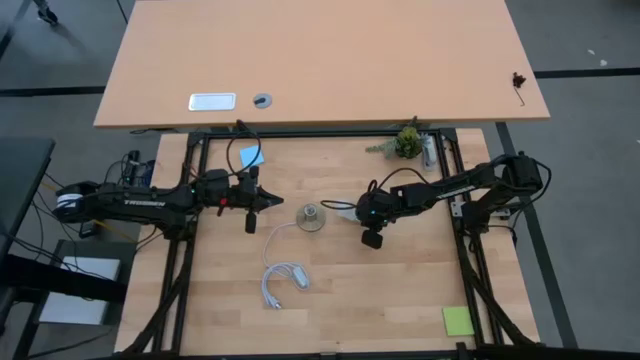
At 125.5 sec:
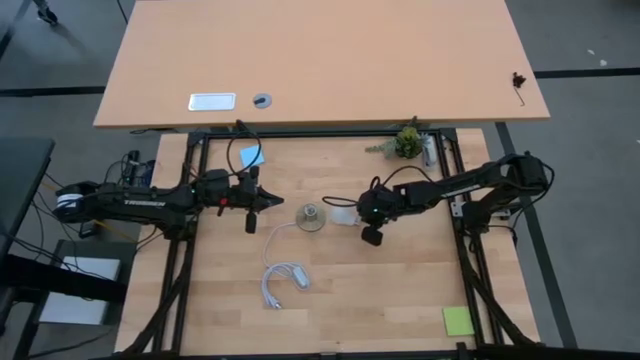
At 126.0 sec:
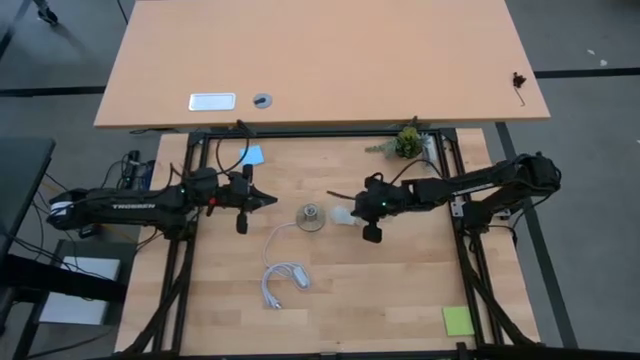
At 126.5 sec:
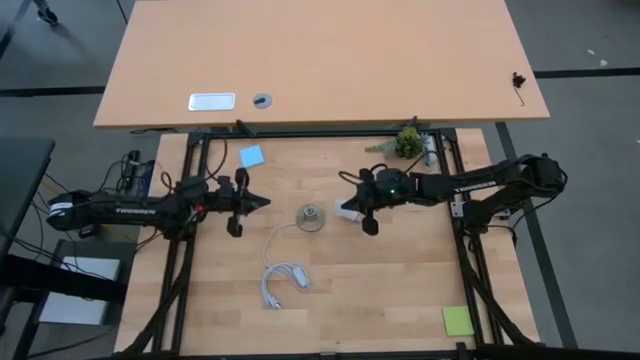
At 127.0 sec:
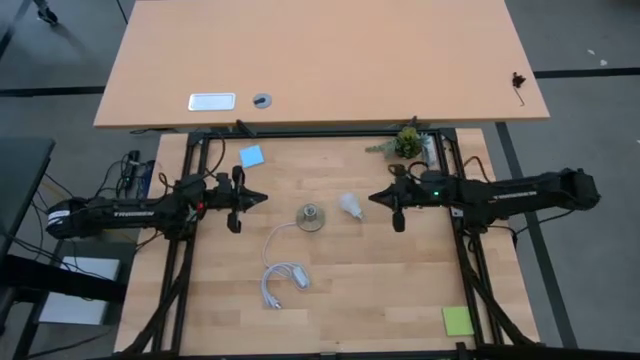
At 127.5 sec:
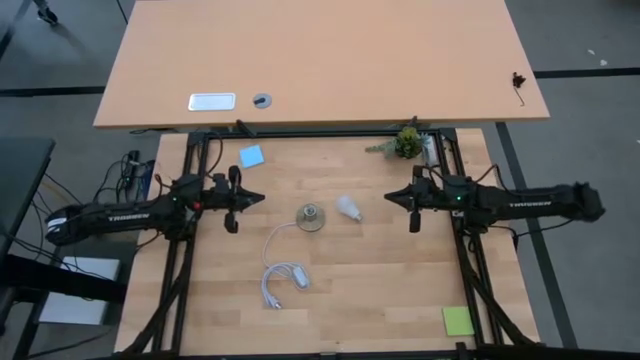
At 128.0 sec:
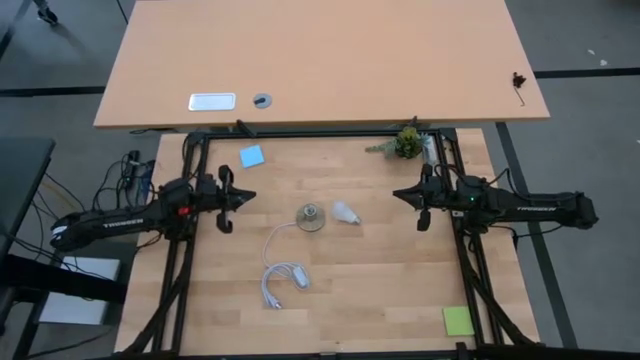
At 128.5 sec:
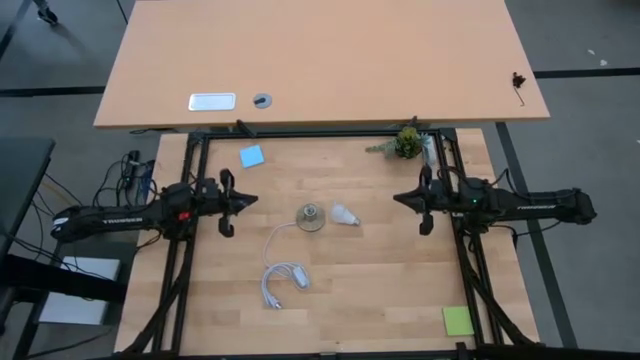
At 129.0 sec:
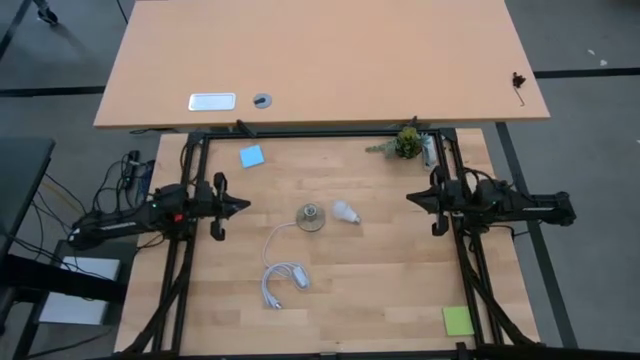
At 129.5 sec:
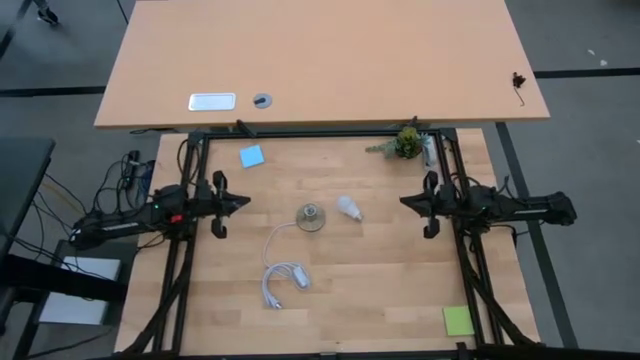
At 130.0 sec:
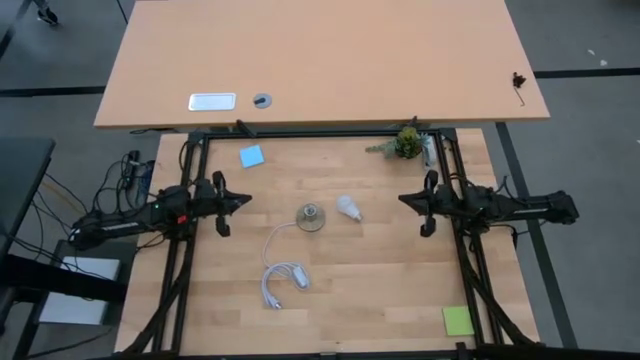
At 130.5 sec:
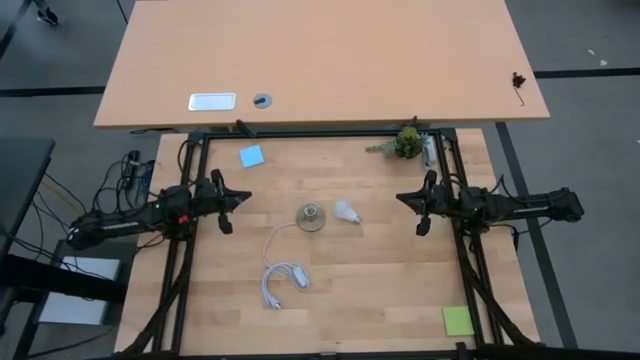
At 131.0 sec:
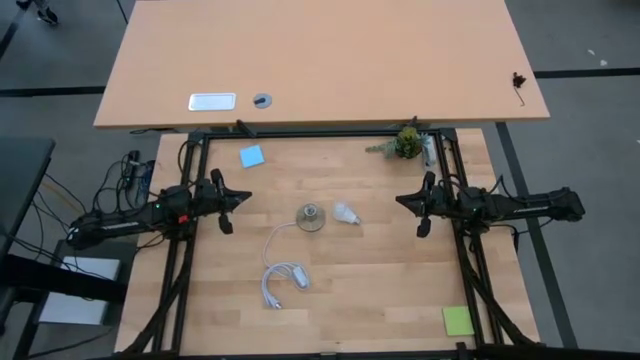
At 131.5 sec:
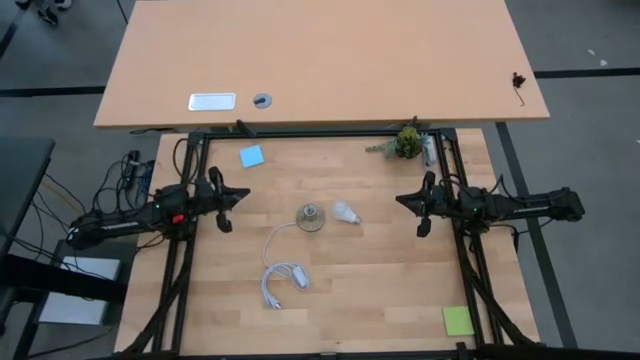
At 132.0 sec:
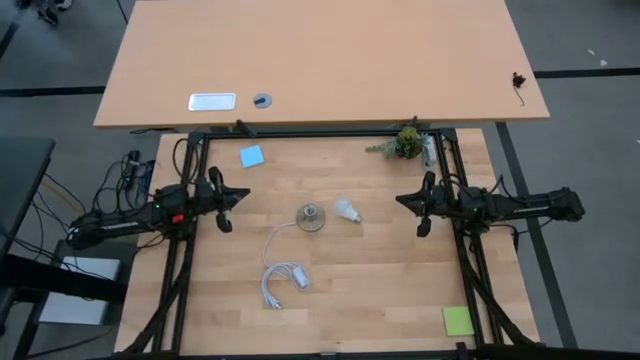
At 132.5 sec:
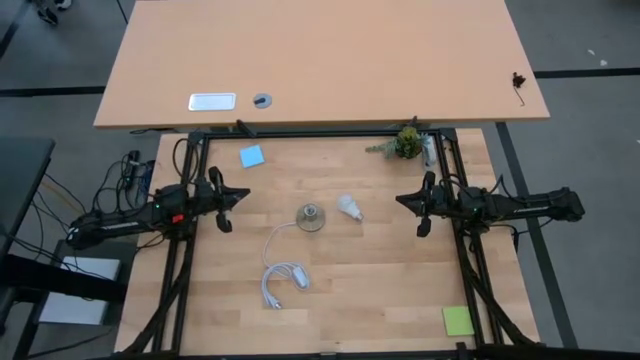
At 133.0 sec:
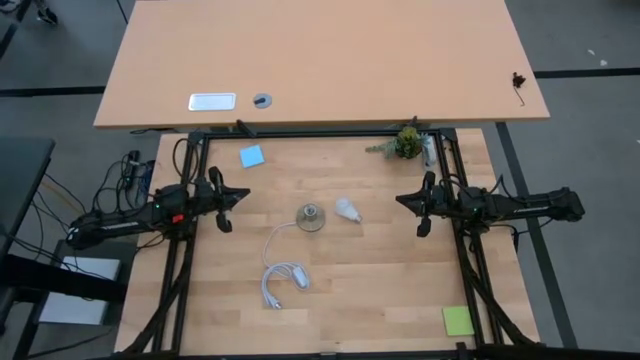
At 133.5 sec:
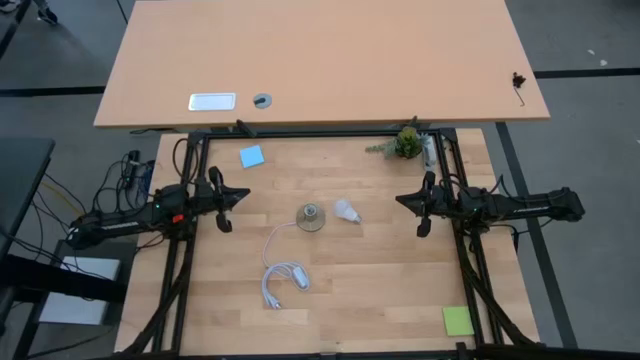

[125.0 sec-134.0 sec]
Task: Screw lightbulb
Return to Home Position

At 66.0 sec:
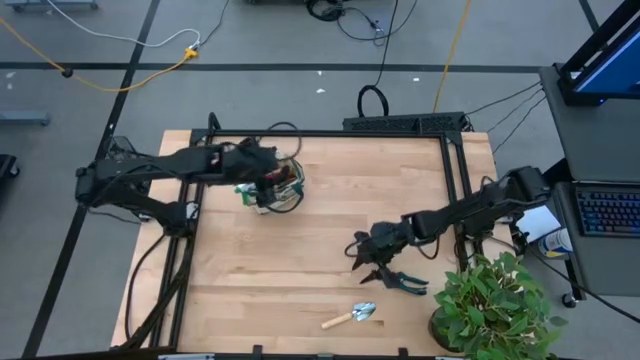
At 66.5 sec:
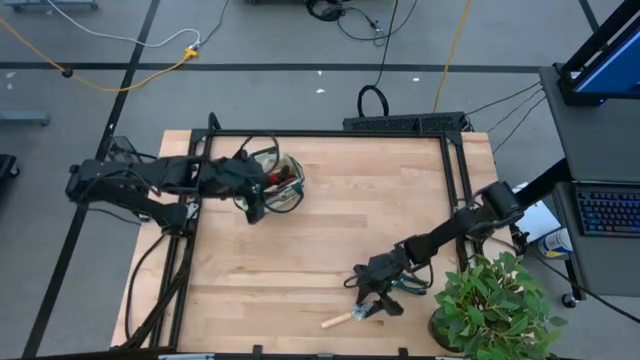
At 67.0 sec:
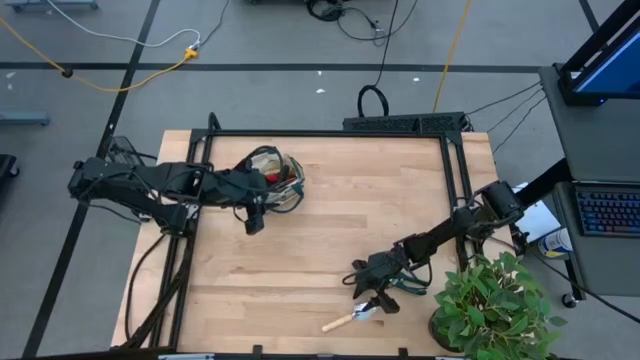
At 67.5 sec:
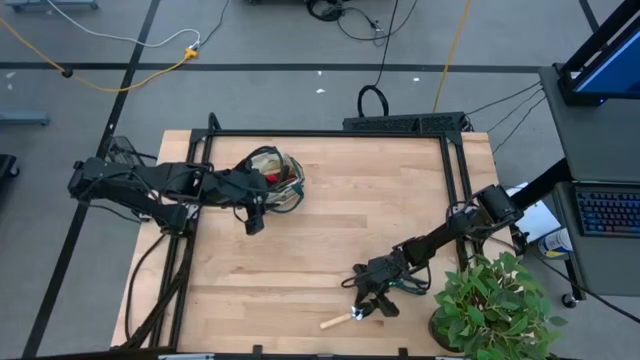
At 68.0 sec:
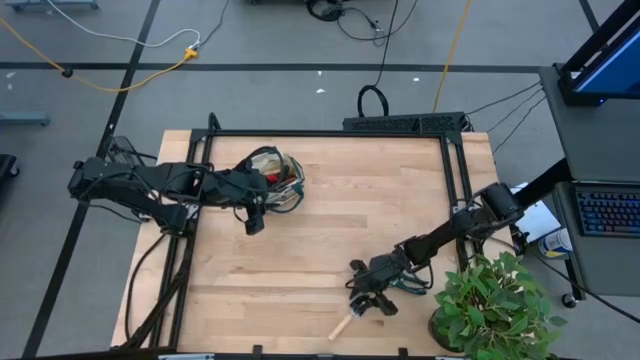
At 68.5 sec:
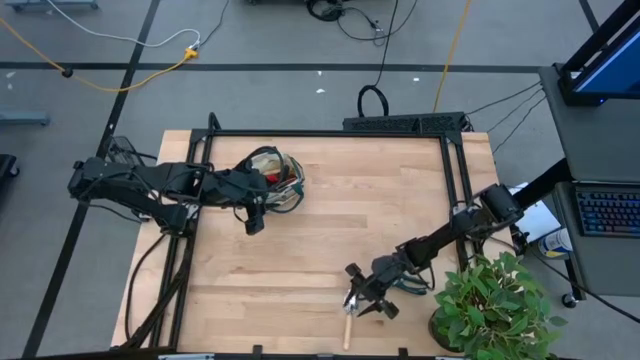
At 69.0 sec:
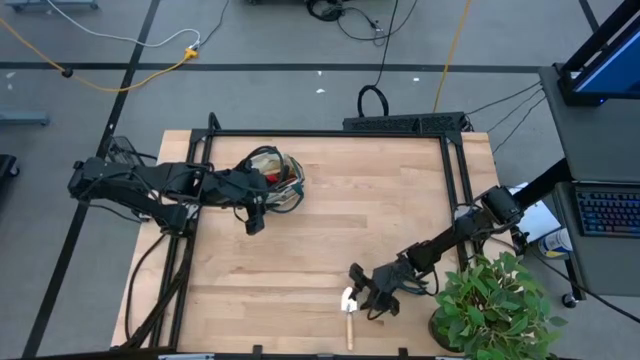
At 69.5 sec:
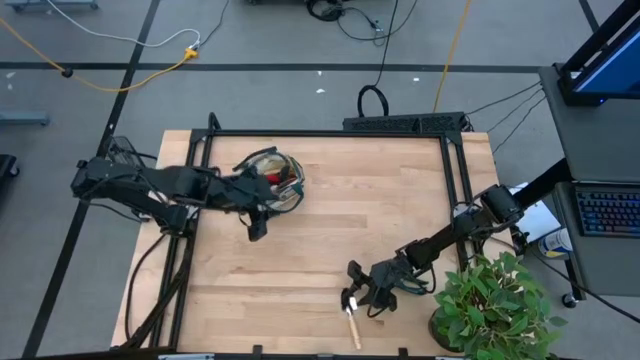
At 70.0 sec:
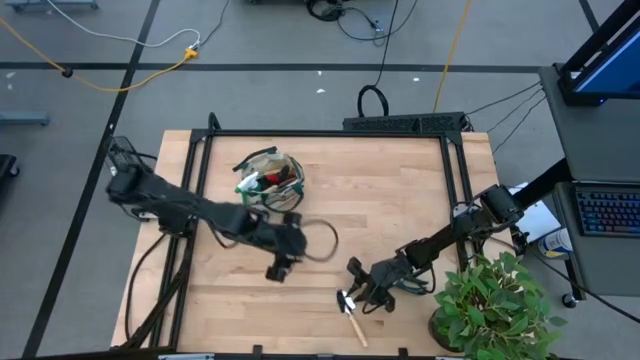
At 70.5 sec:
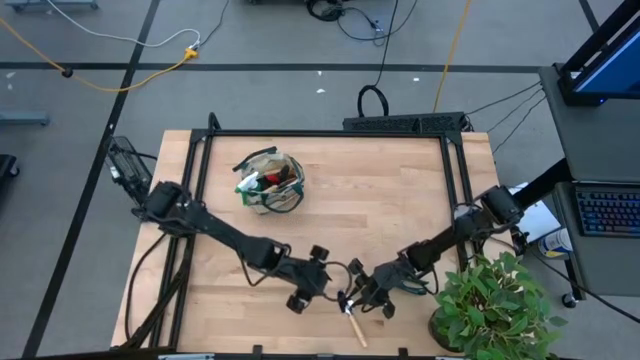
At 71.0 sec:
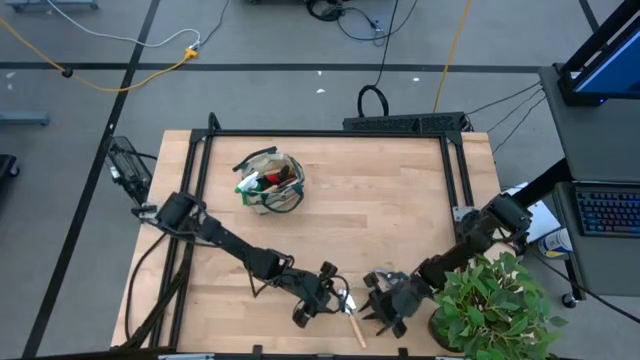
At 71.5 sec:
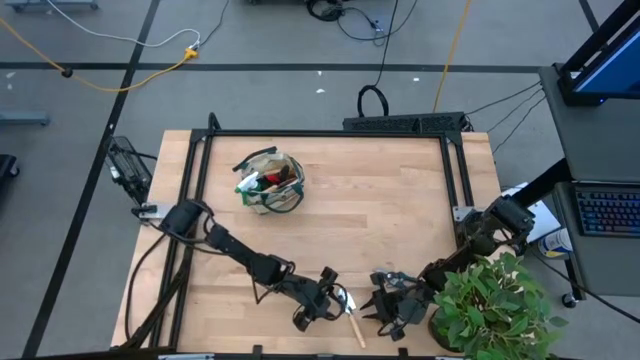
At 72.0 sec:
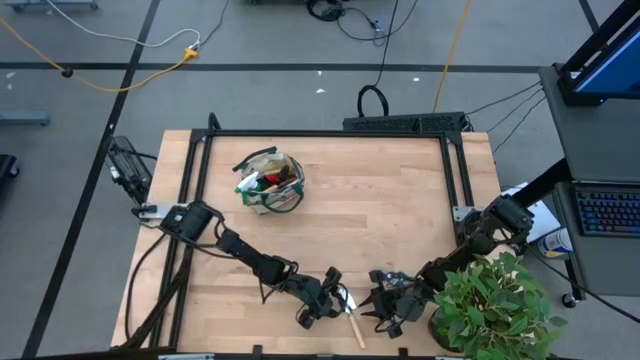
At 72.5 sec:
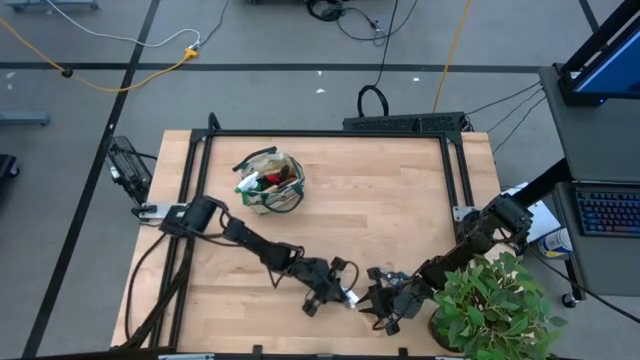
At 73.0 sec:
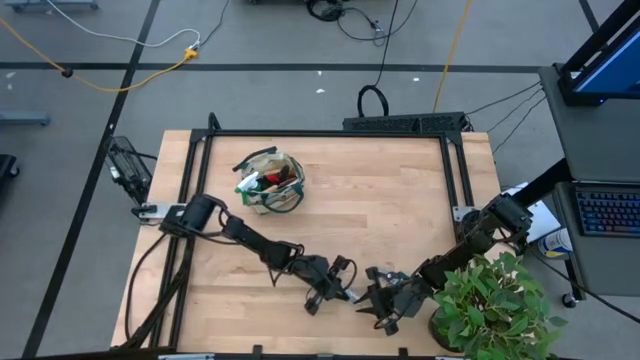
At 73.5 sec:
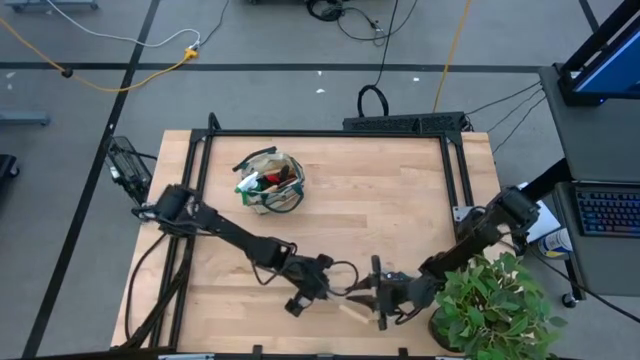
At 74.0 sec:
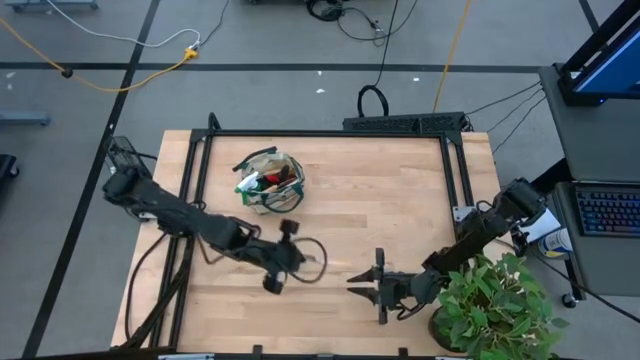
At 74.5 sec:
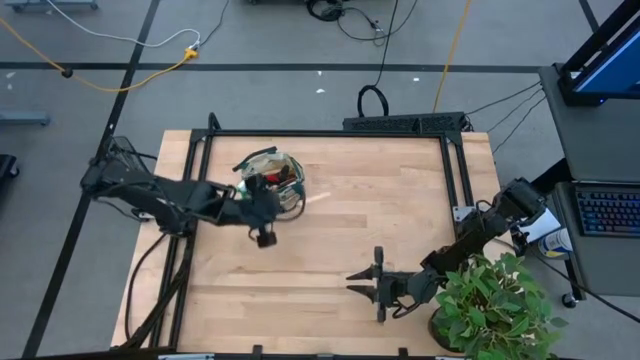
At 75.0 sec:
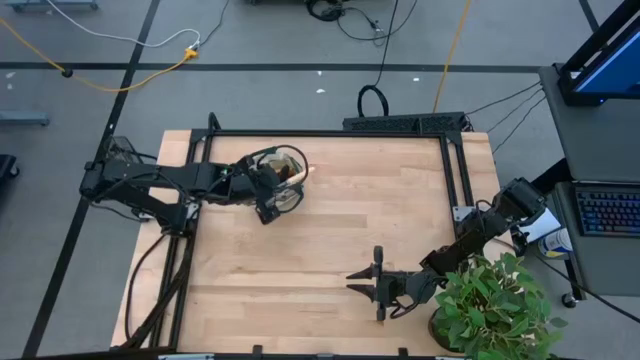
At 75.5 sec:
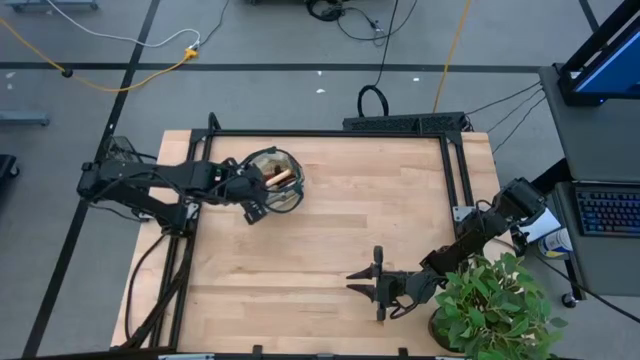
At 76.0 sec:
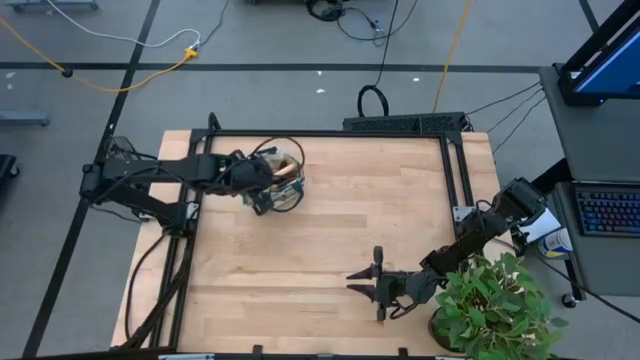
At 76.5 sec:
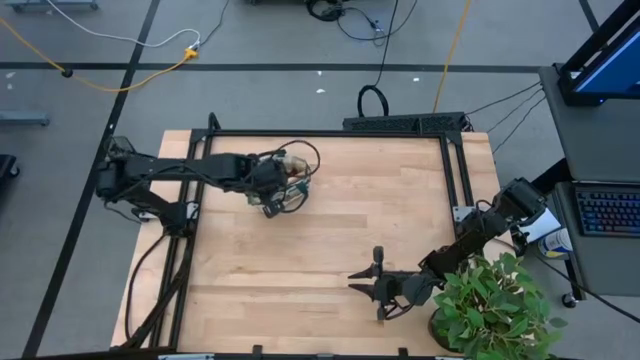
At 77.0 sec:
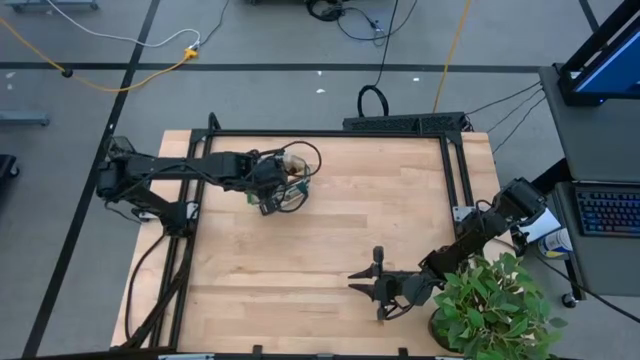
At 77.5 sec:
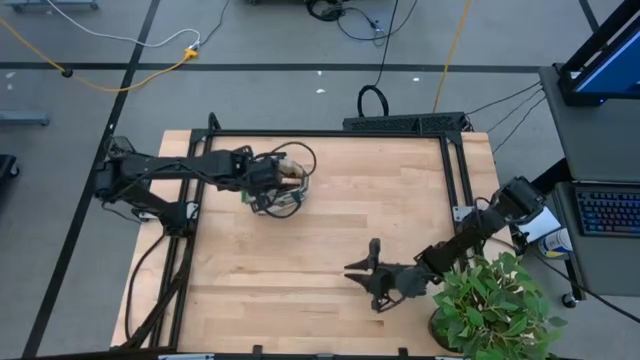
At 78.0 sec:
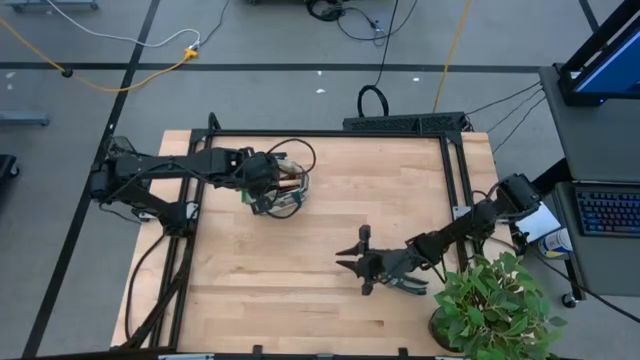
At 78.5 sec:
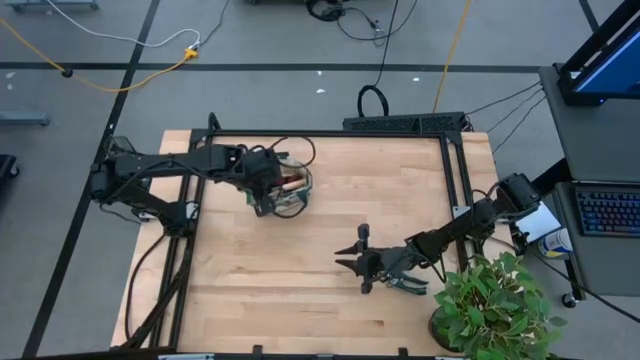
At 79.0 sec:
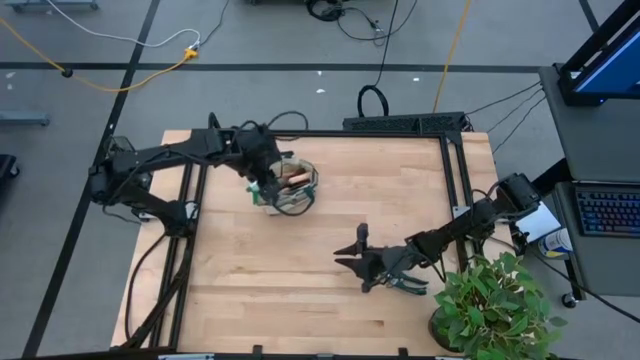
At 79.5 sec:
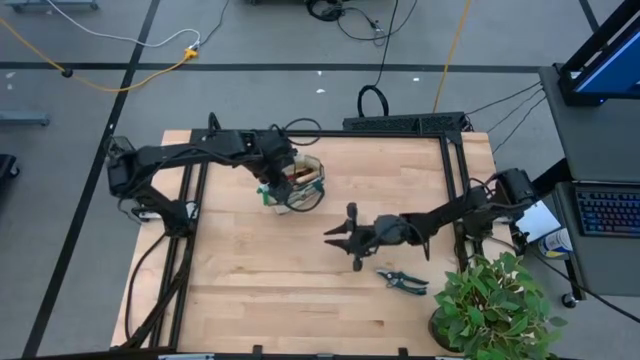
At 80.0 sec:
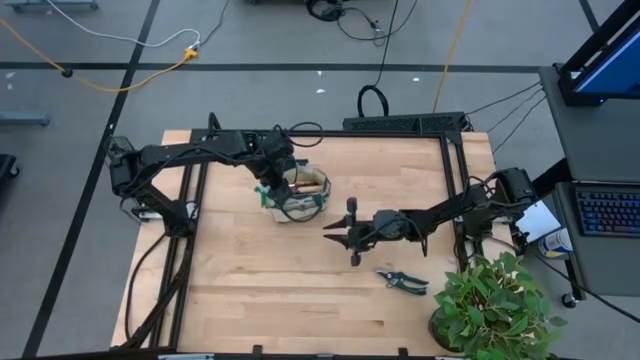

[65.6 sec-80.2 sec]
Task: Pick & Place Garden tools in Gardening bag
Put the trowel into the gardening bag
